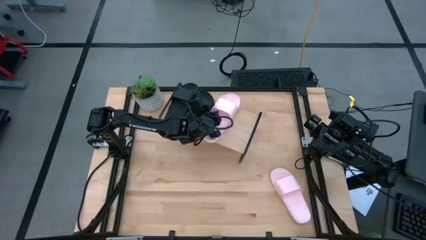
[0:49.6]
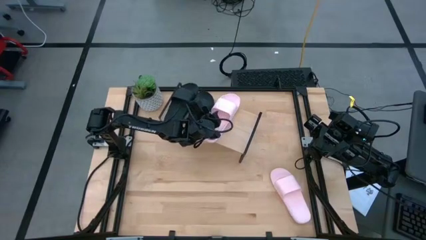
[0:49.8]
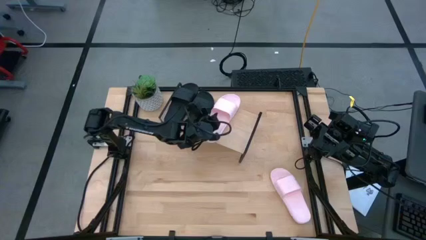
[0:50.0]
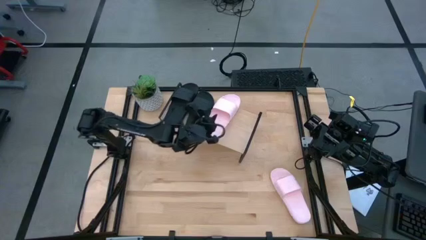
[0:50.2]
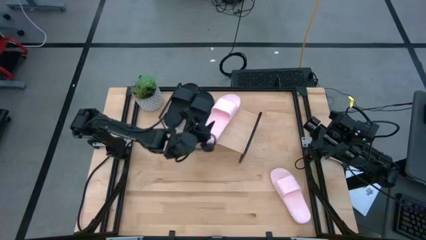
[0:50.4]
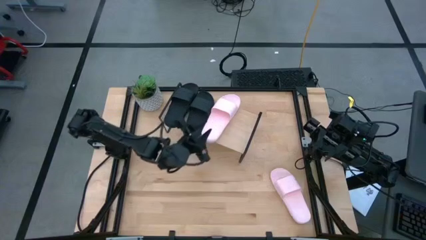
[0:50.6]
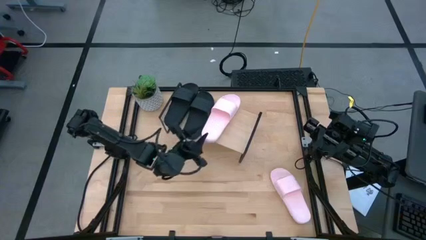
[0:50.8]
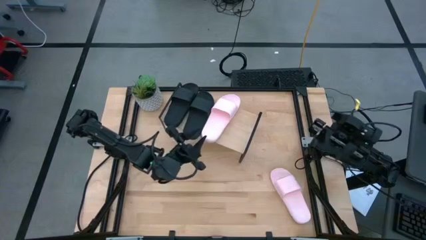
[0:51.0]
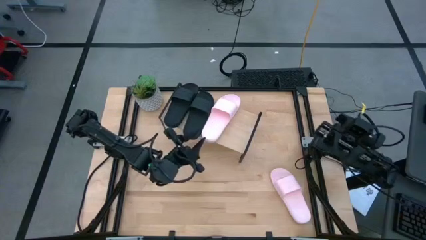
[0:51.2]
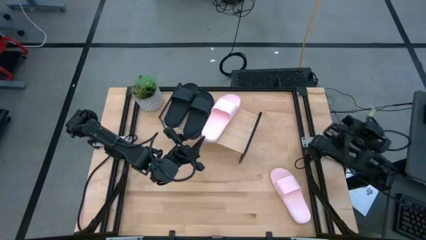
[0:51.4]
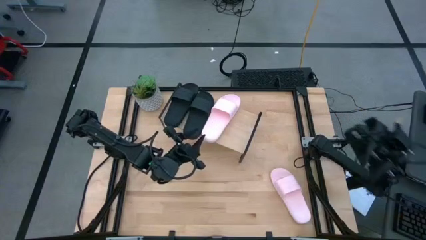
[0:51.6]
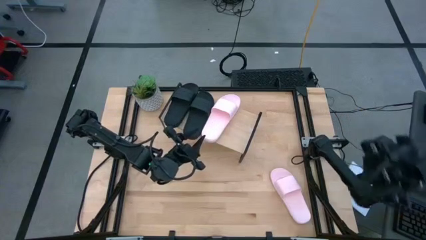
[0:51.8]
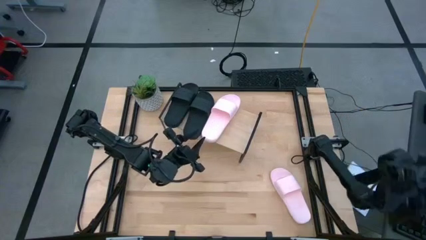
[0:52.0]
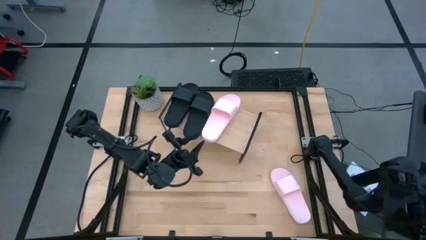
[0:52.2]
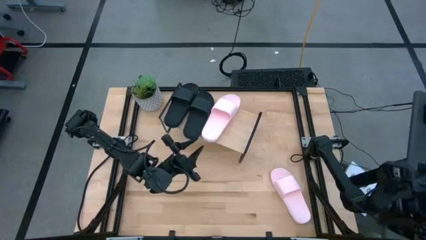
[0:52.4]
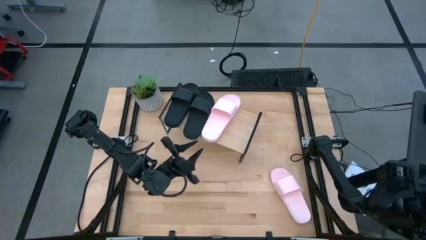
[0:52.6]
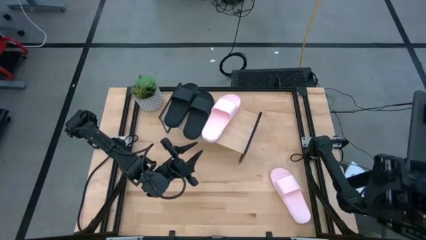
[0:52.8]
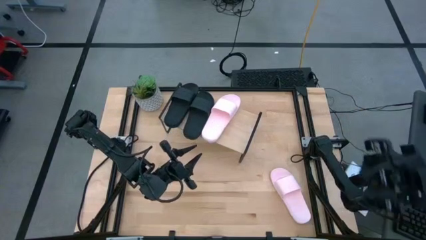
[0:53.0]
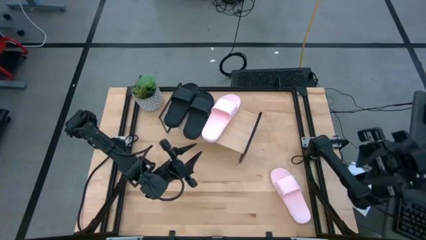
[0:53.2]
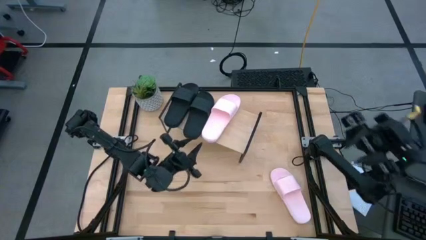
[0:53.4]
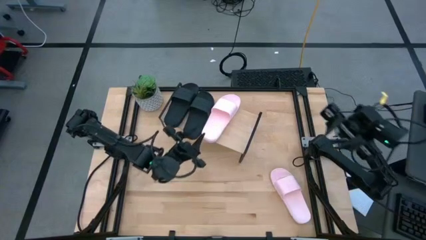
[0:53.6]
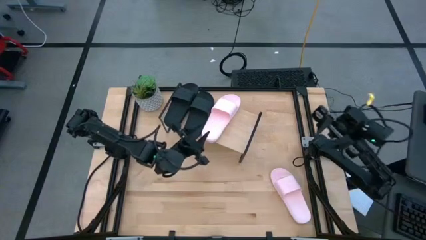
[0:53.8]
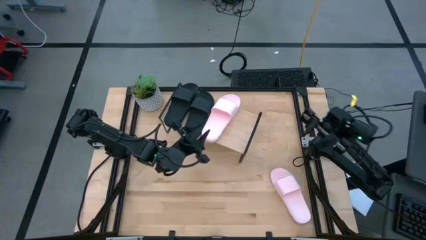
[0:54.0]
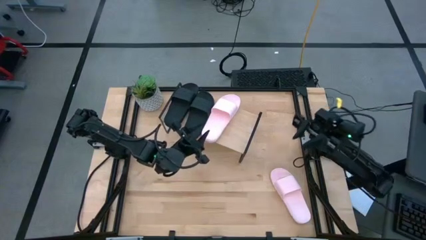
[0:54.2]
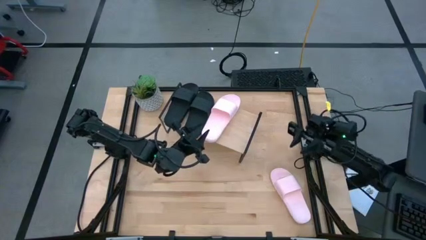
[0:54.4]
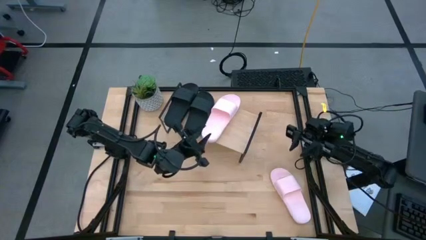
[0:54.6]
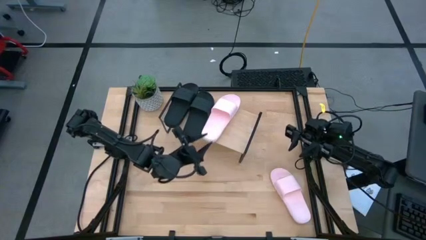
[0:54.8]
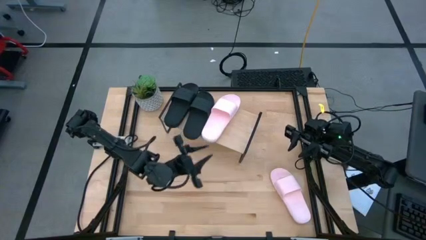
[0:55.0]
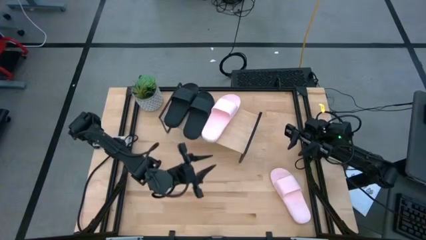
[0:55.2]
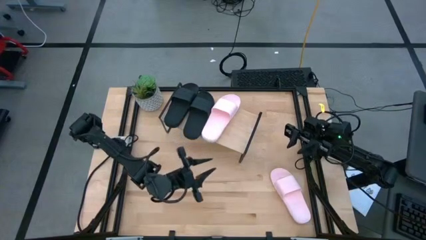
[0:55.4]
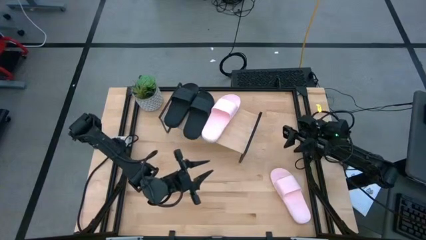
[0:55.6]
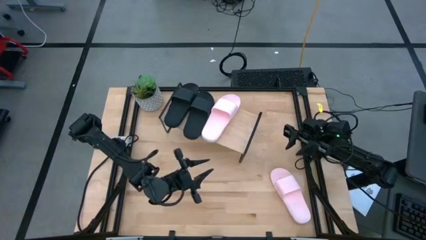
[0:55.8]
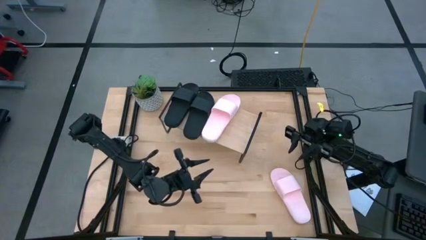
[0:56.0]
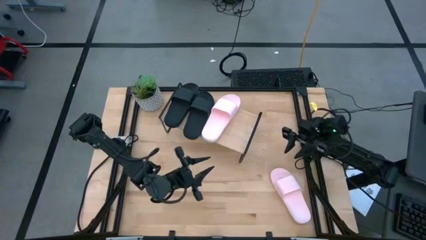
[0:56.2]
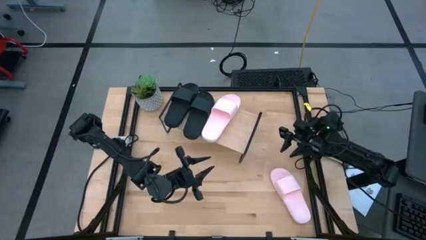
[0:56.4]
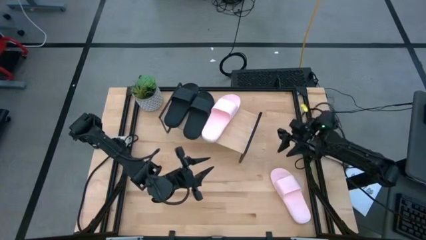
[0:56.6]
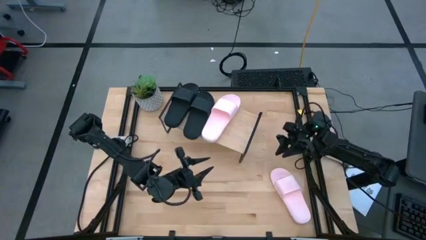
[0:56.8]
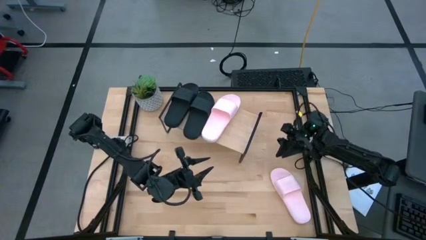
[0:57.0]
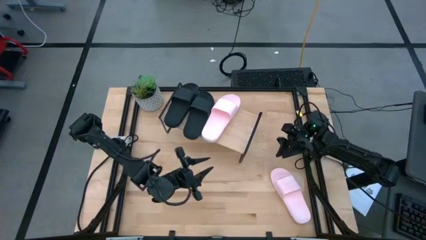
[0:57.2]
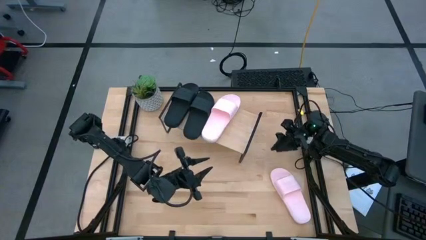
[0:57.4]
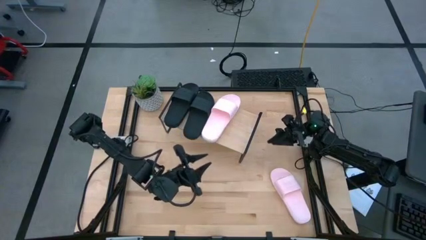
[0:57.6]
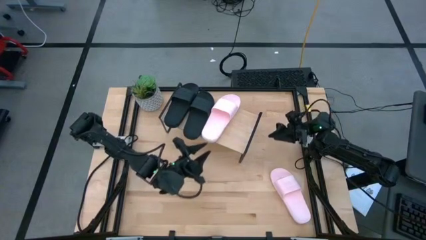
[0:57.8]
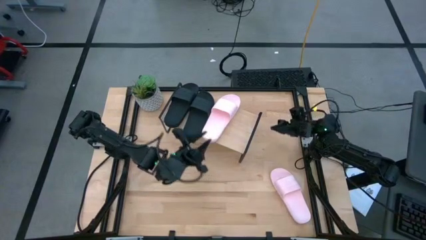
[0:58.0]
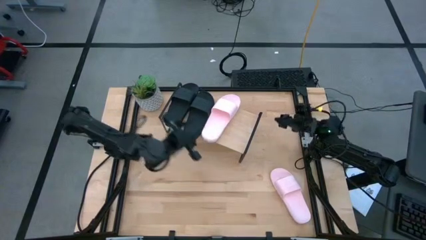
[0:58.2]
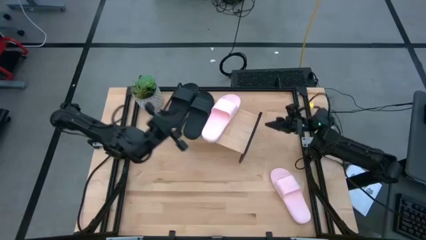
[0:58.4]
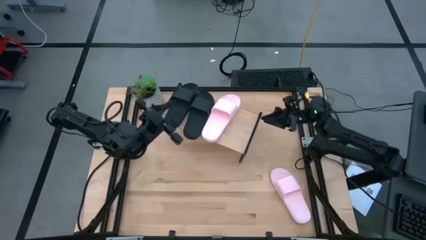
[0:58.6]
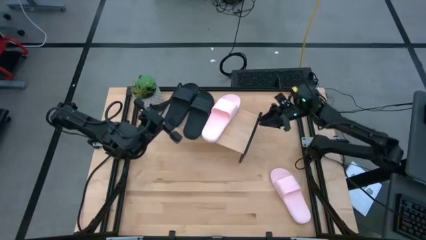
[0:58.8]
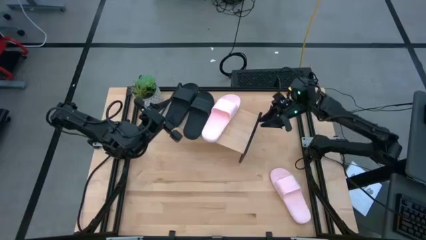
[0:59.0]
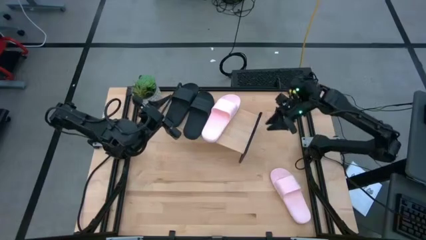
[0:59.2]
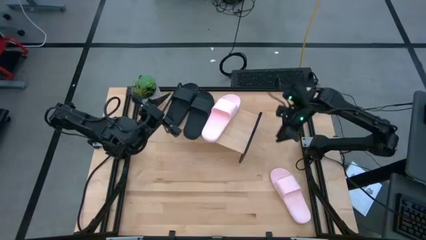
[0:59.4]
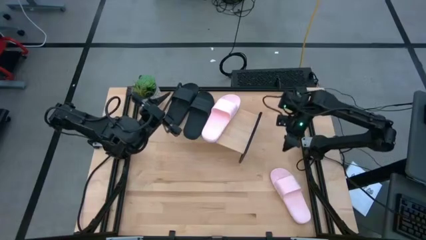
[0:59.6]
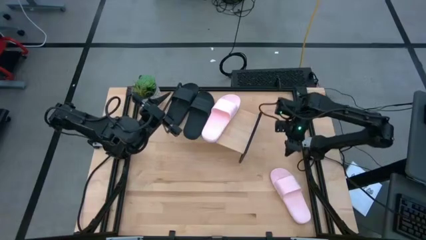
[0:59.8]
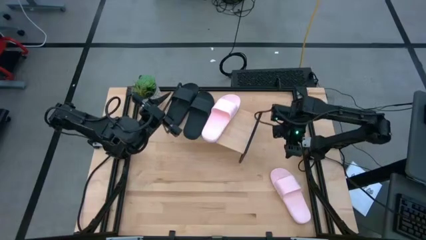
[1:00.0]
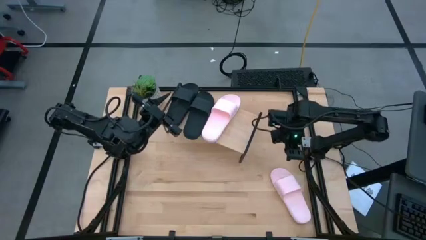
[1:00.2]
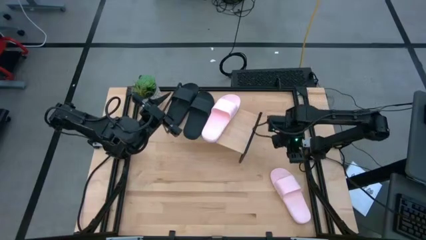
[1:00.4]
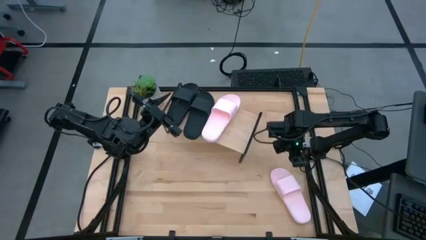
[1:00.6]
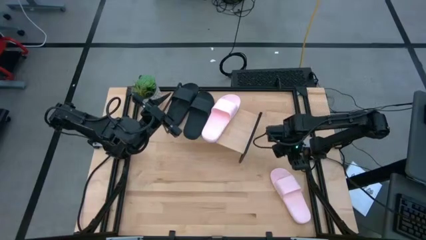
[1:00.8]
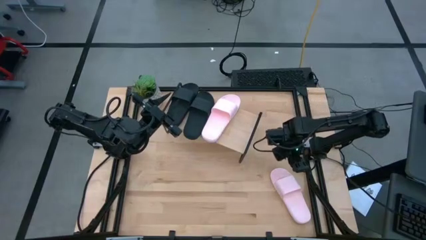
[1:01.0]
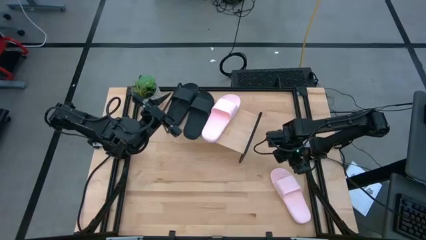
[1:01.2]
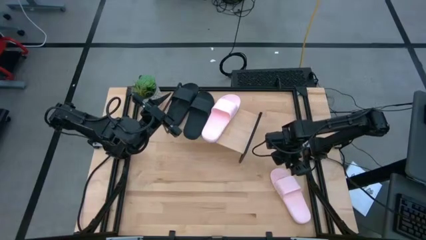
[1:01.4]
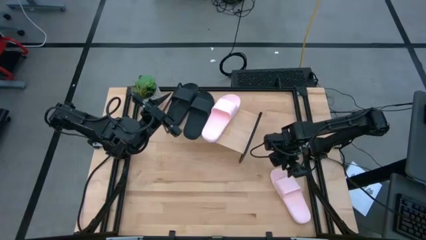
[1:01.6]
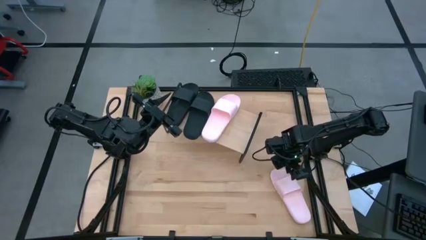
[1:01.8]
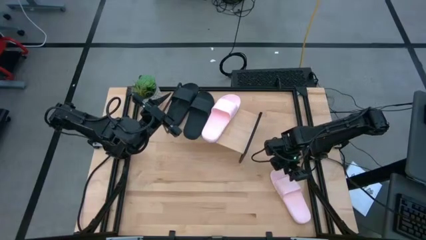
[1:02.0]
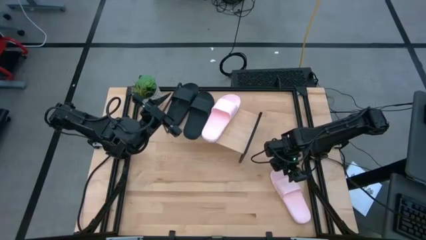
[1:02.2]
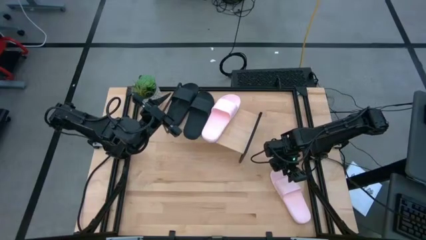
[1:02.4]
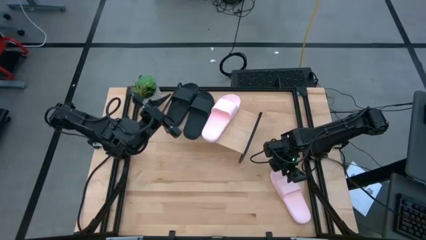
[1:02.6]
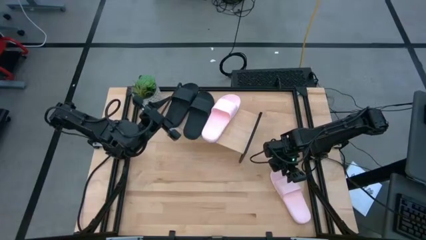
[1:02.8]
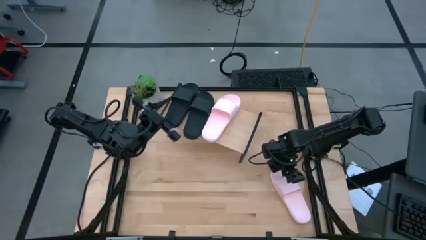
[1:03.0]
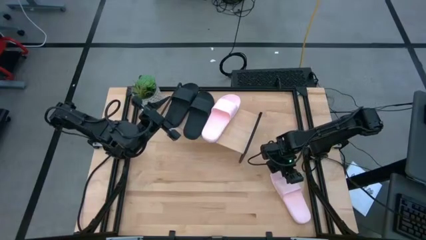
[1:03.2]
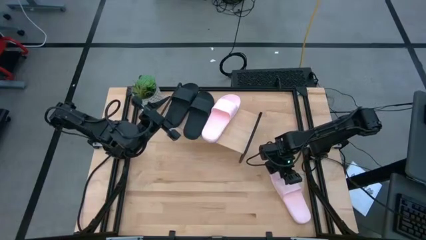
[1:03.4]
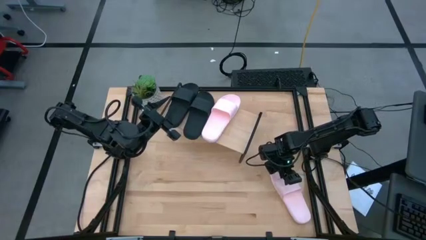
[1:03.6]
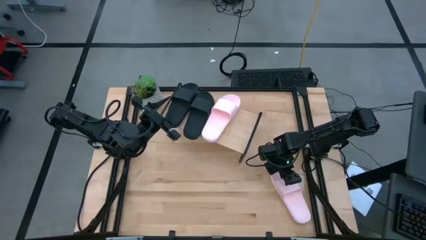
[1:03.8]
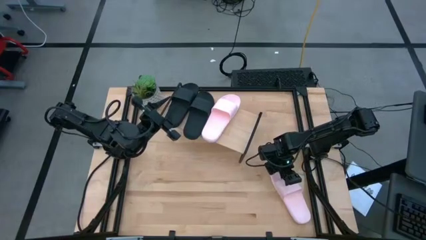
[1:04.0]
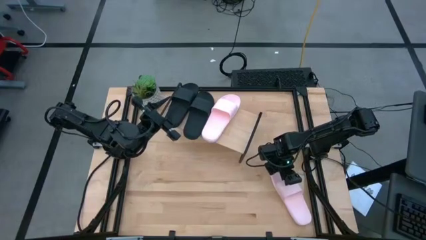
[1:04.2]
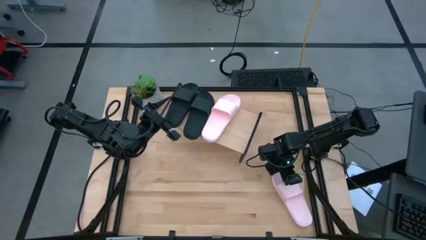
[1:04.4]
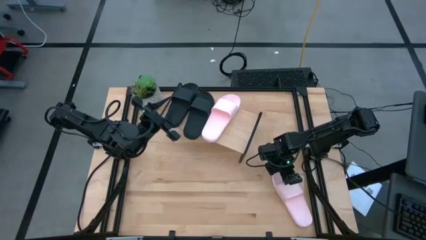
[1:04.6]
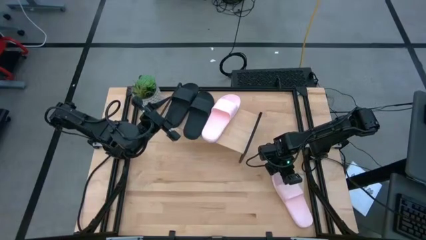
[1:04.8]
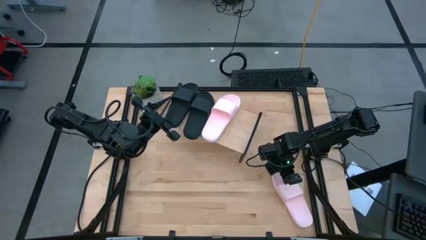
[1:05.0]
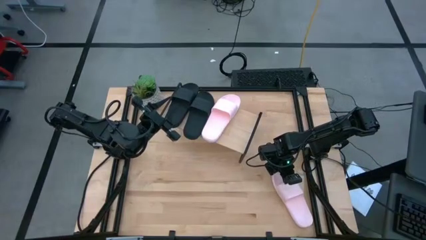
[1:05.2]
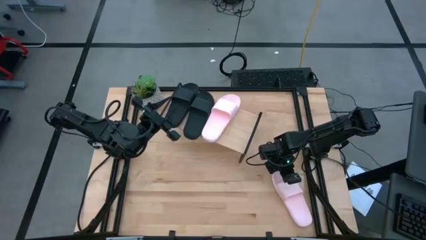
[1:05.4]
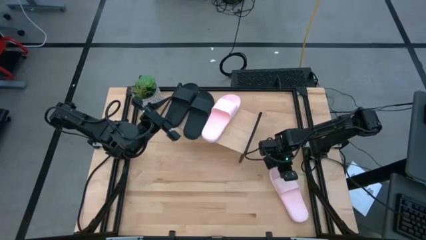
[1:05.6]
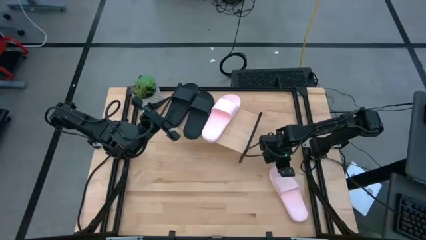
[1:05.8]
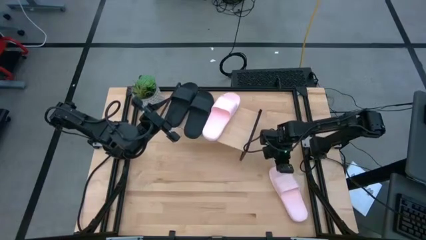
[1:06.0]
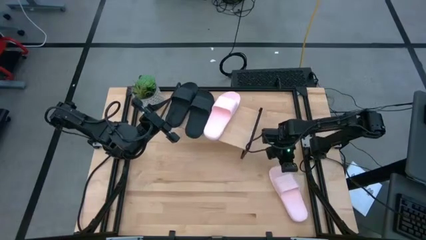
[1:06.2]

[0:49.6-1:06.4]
Task: Pick and place slides into the shelf
Put the pink slide on the shelf
